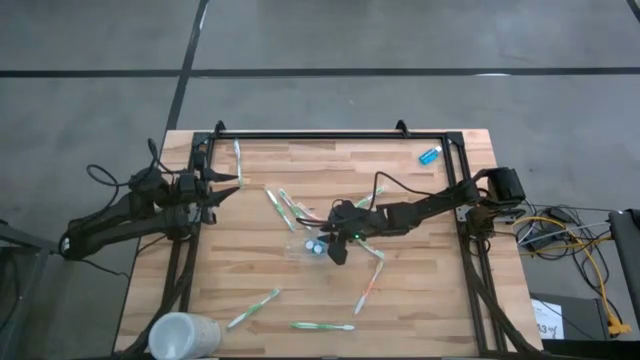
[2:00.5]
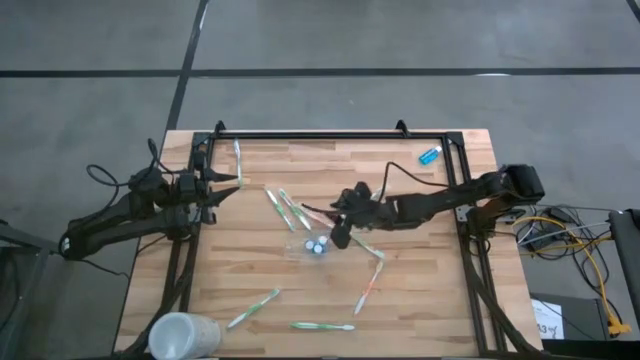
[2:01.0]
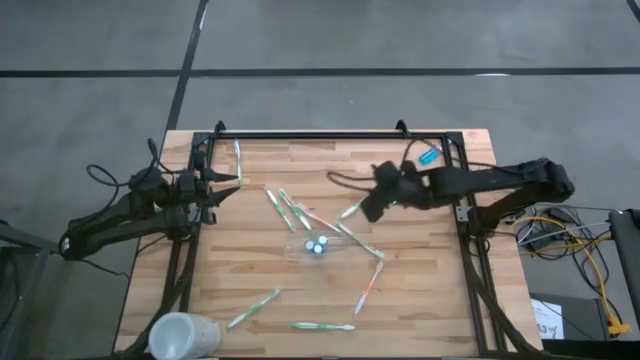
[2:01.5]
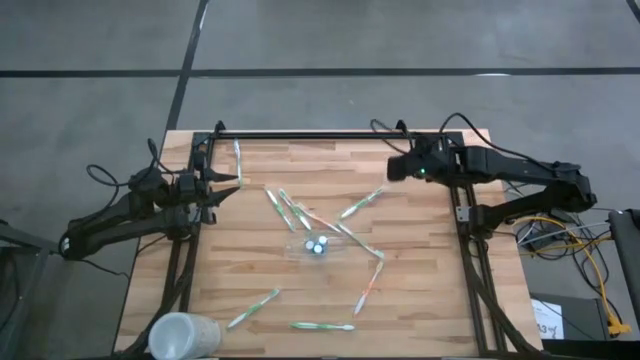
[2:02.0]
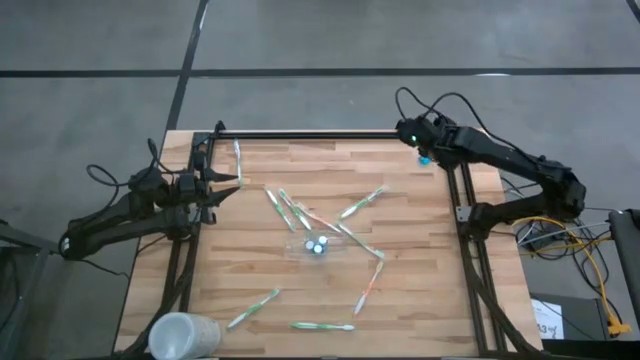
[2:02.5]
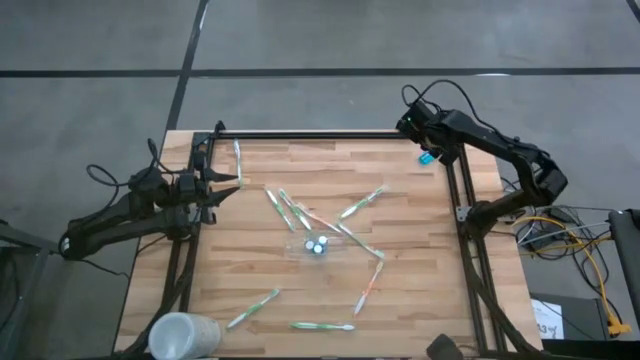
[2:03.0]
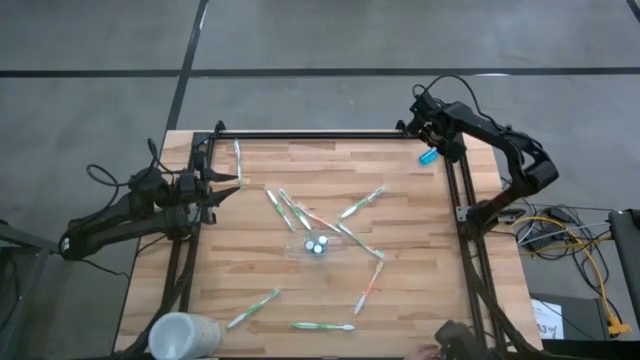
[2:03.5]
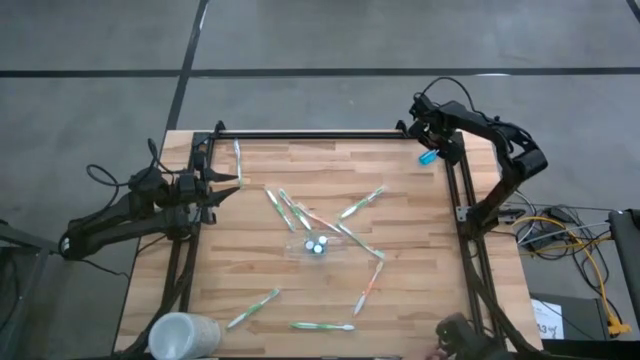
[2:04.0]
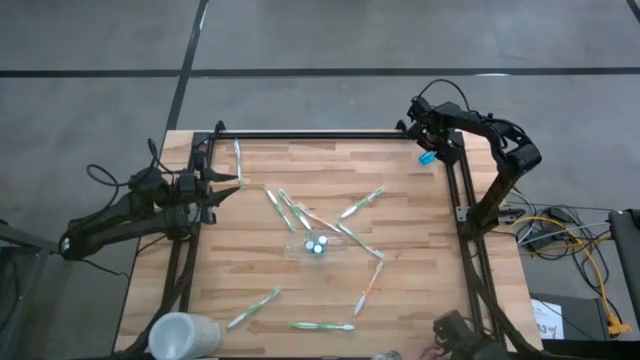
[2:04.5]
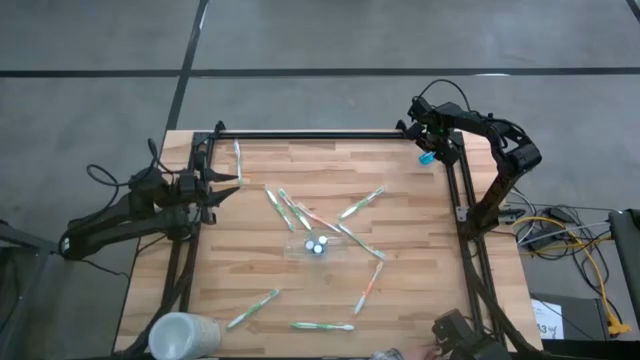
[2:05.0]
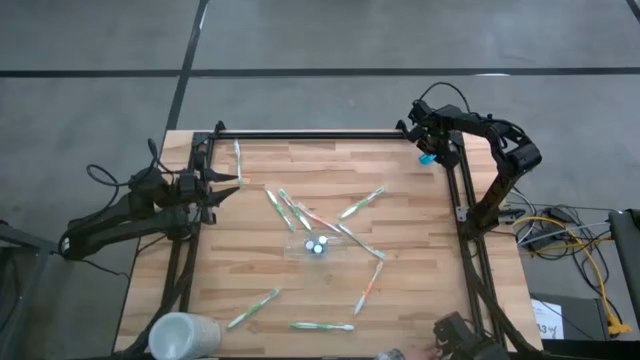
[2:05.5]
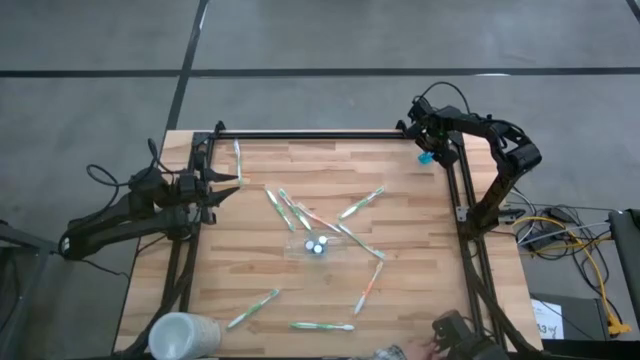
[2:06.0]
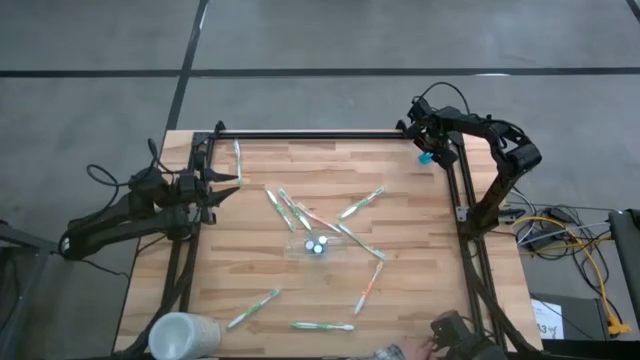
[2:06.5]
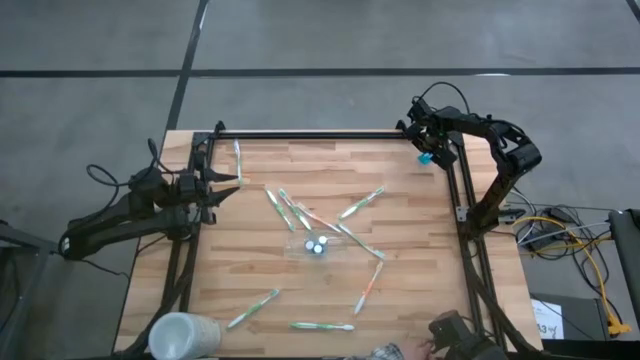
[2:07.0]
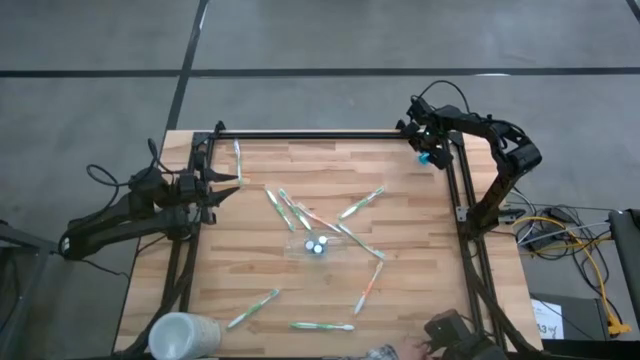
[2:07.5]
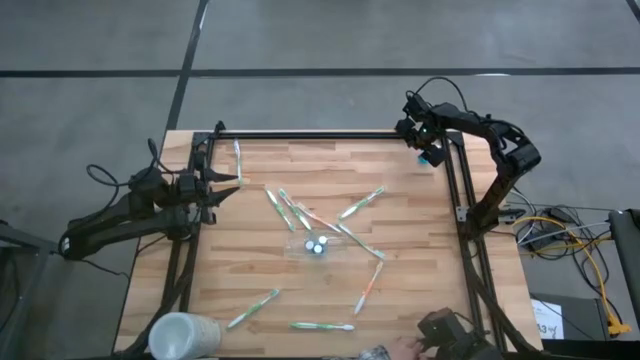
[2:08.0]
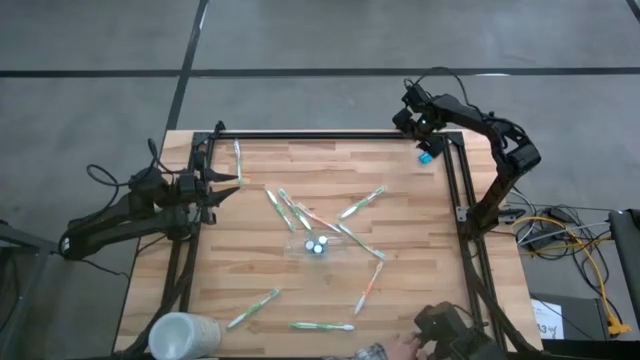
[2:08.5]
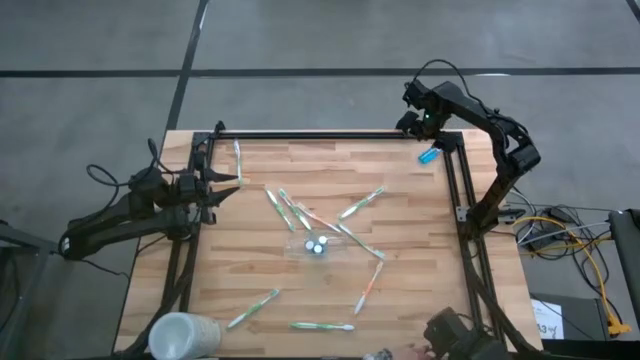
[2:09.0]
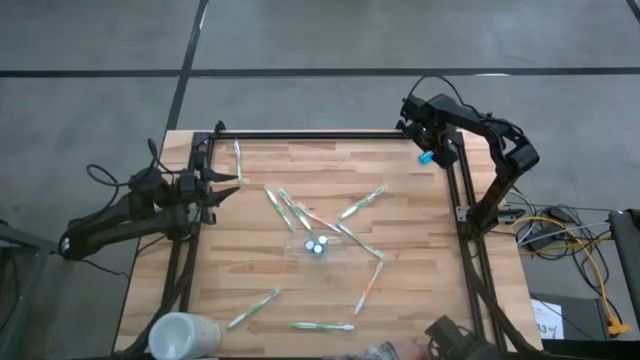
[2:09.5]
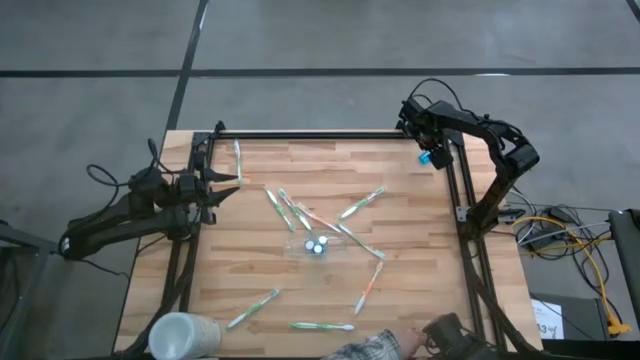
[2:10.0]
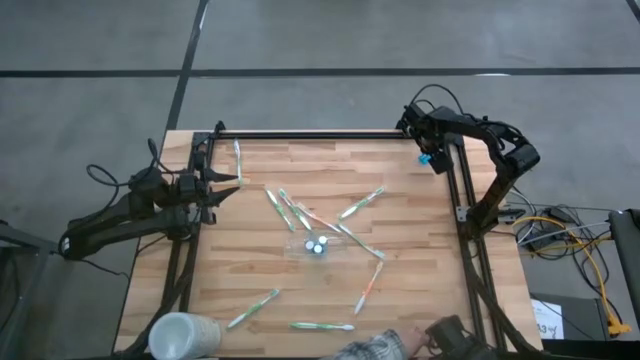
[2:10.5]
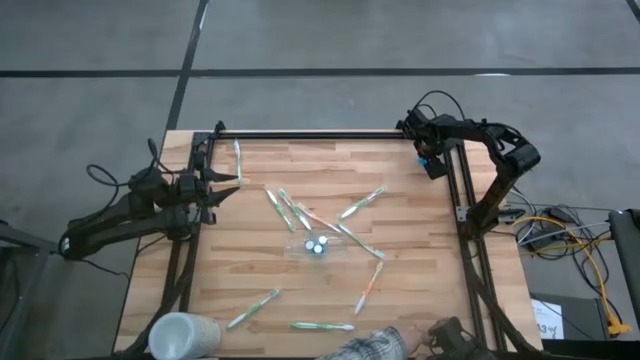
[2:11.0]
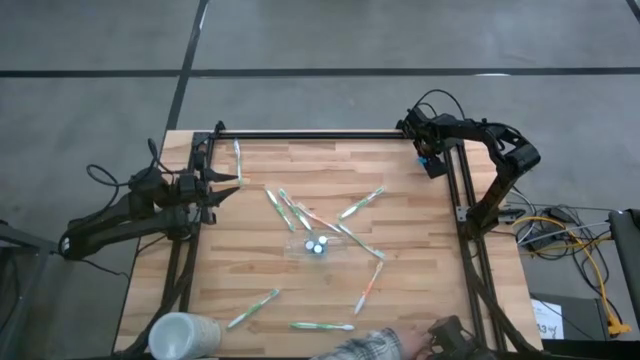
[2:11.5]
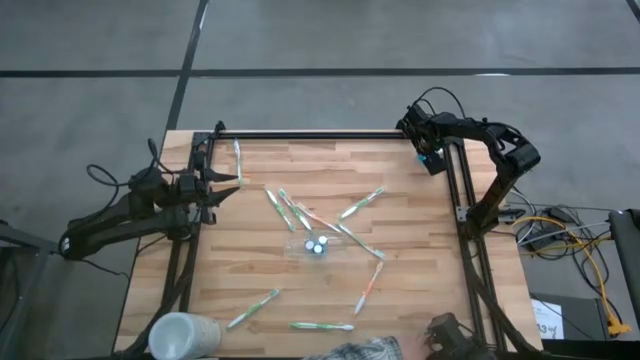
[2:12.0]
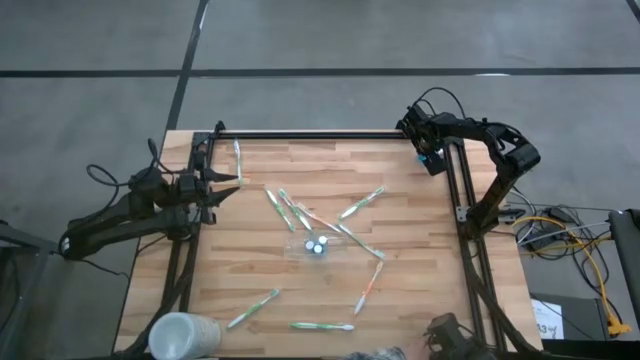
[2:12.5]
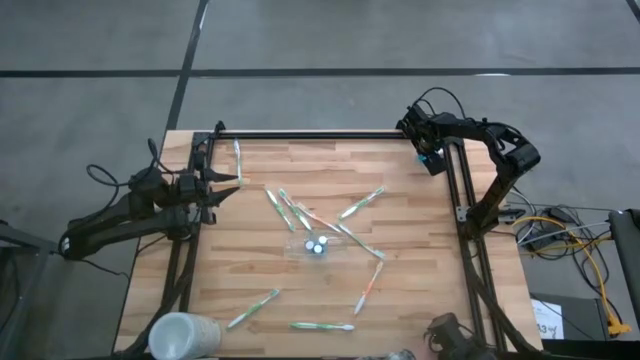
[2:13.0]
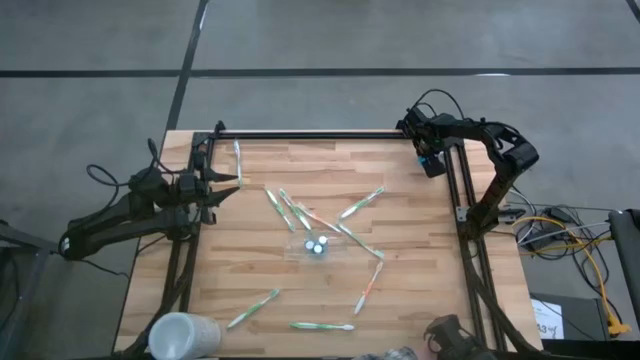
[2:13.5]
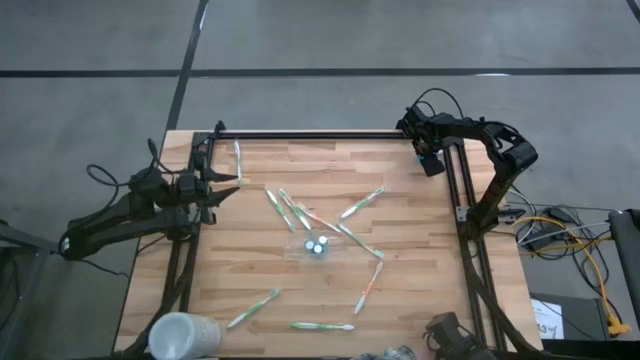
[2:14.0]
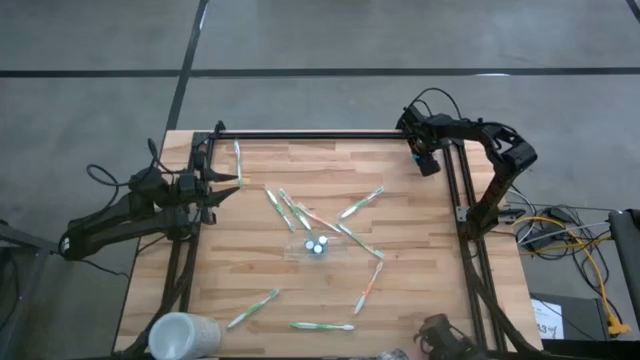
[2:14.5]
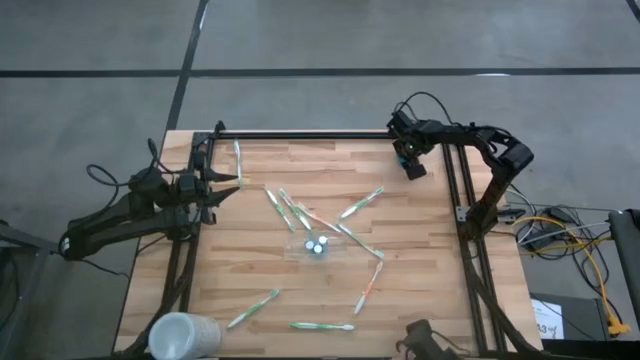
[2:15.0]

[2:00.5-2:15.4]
Task: Pick & Place toothbrushing station
Put the blue mouthwash bottle into the transparent organizer

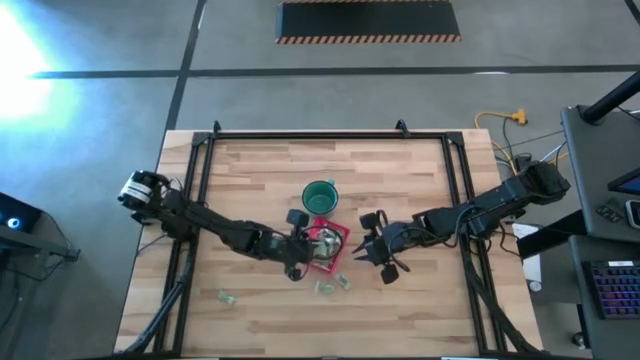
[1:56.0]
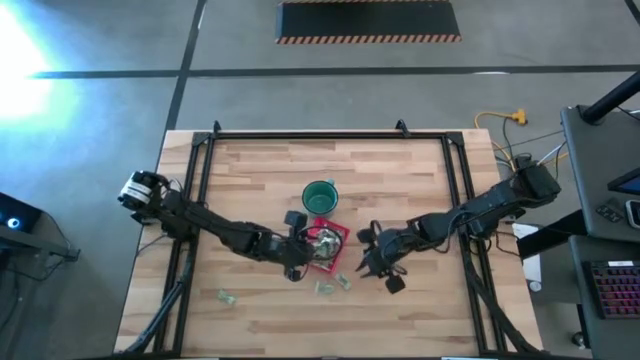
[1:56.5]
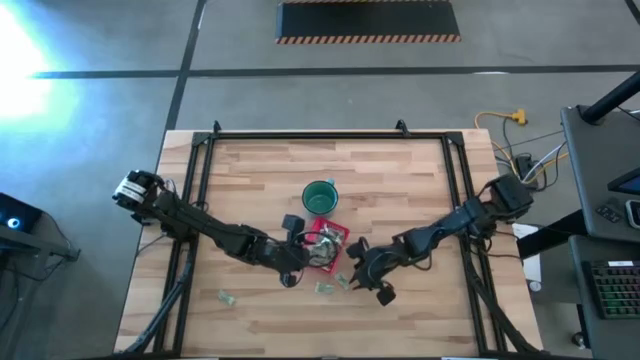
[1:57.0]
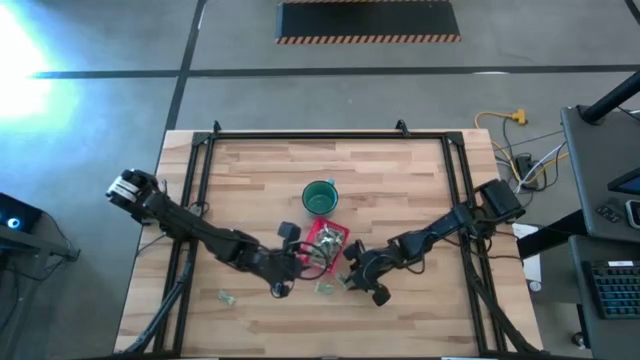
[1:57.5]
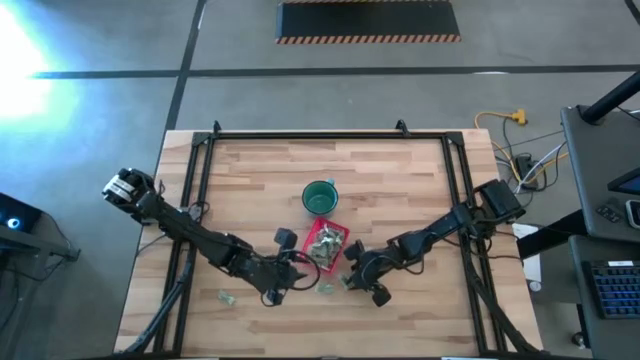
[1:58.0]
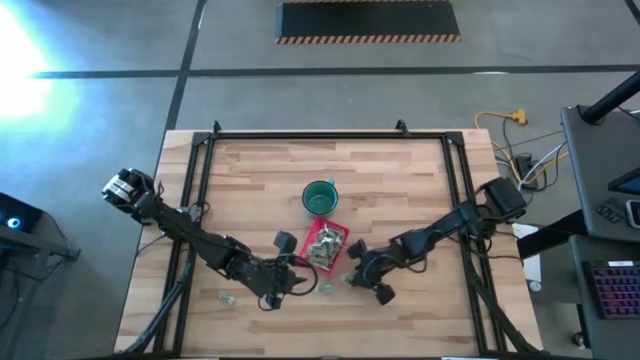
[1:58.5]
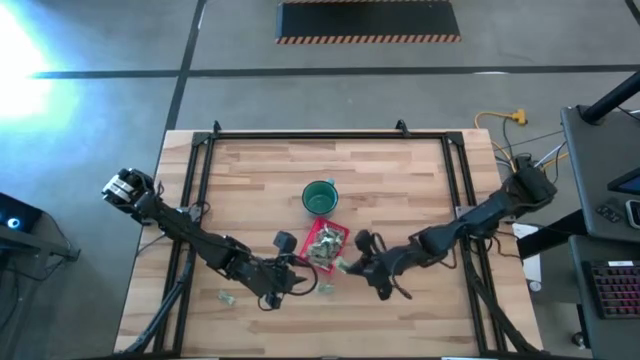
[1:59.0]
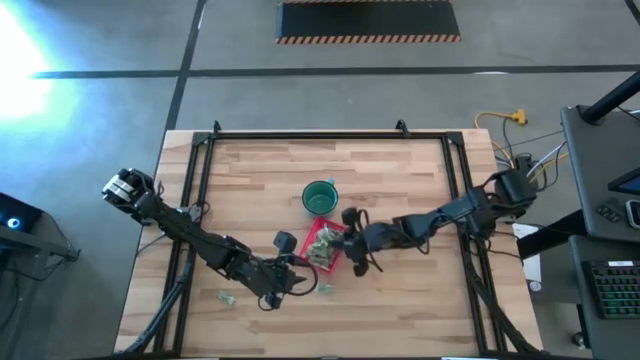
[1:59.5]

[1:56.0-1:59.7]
Task: Pick and place items into bin
Put the light green stevia packet into the red bin

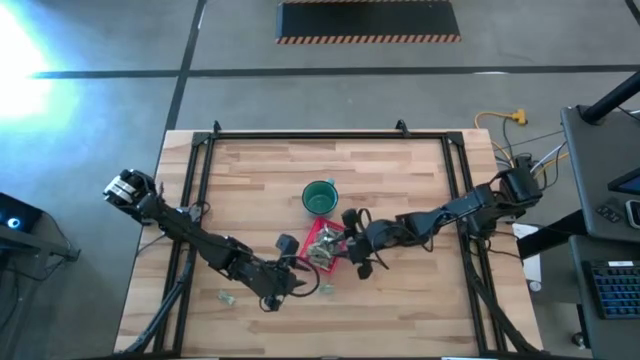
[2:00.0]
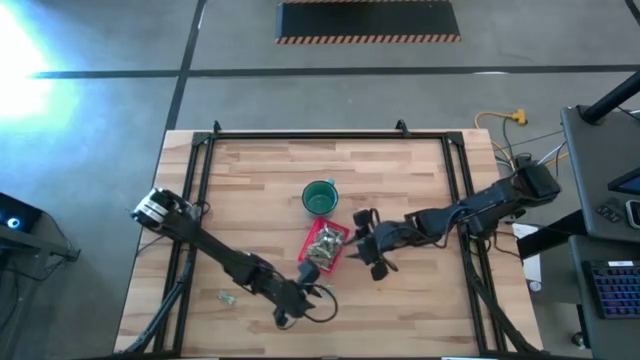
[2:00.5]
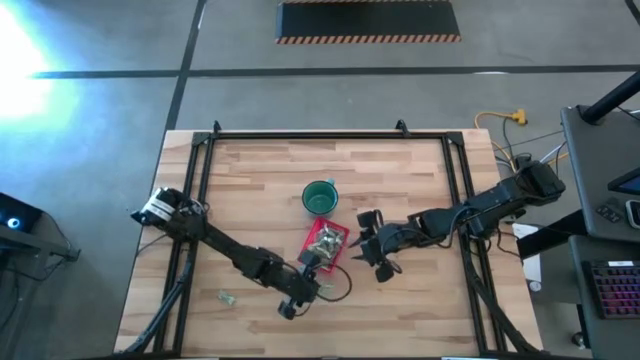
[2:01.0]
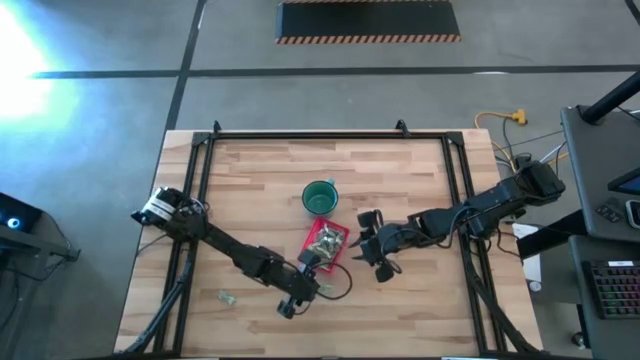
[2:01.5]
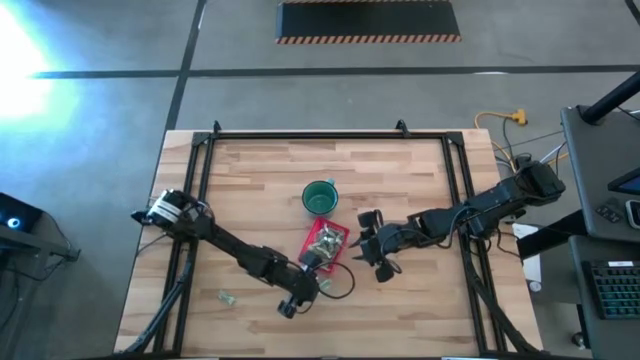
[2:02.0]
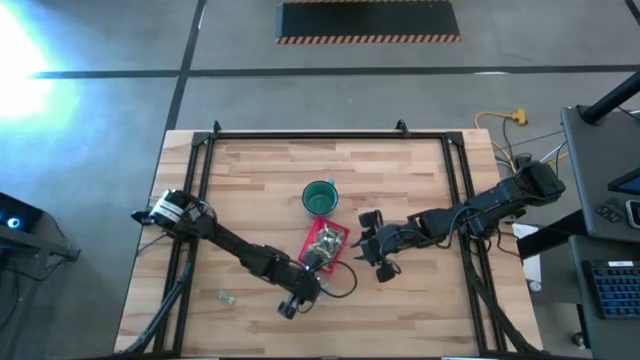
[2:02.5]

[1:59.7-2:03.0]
Put the light green stevia packet into the red bin
